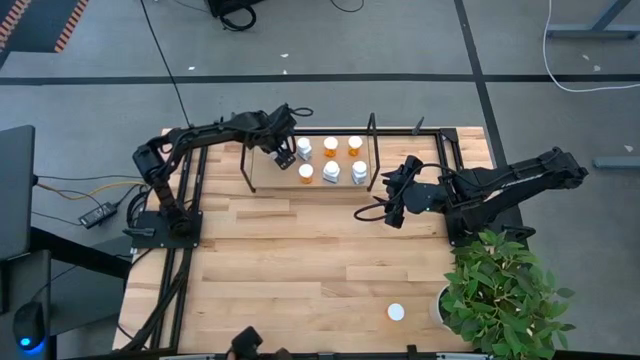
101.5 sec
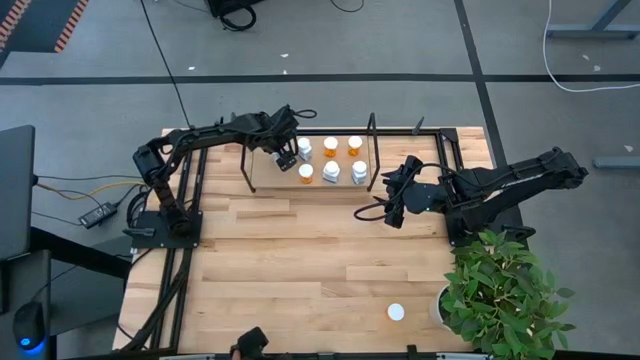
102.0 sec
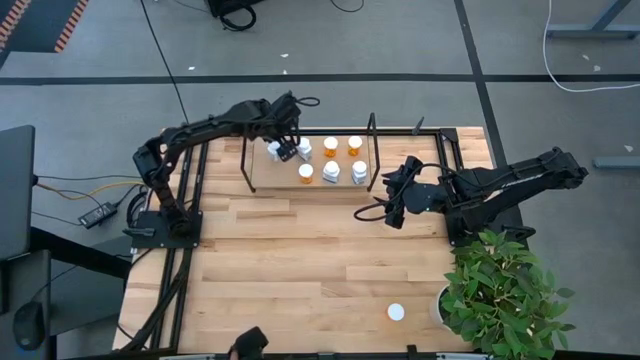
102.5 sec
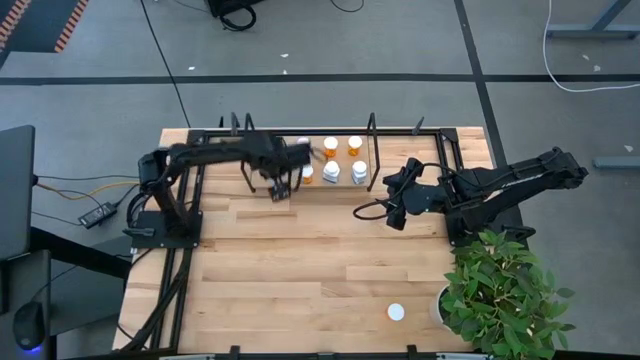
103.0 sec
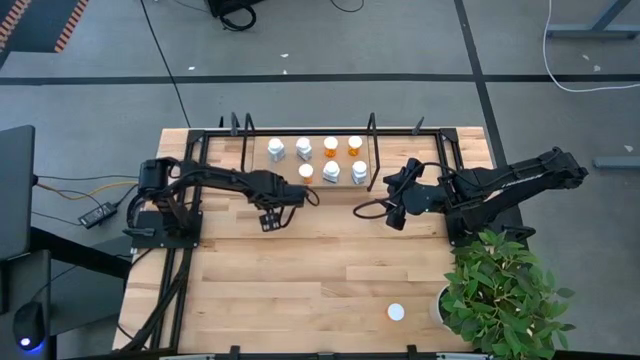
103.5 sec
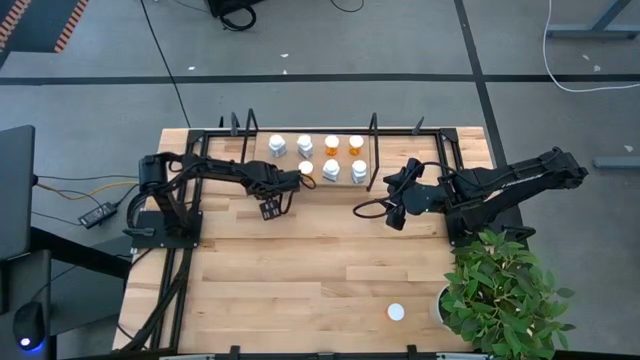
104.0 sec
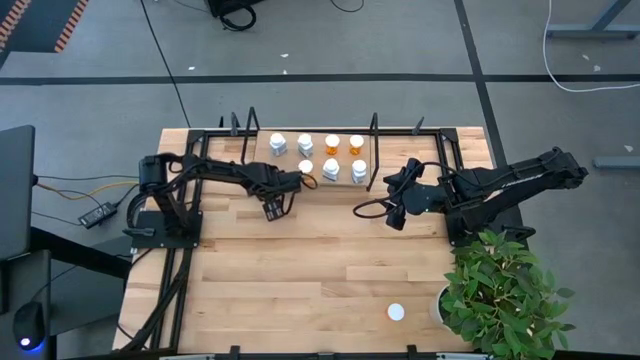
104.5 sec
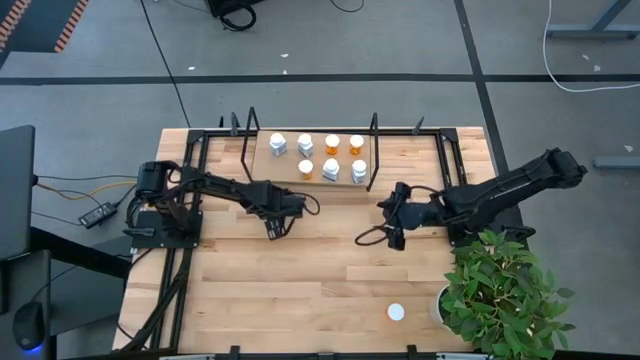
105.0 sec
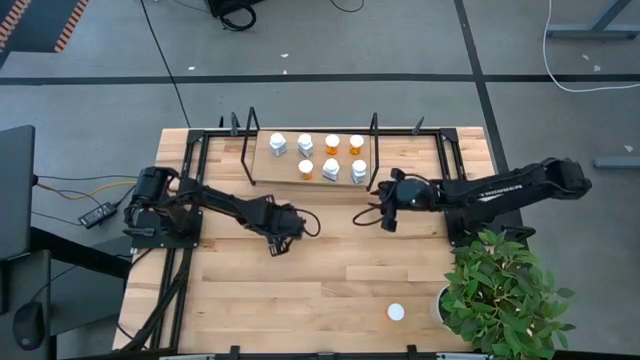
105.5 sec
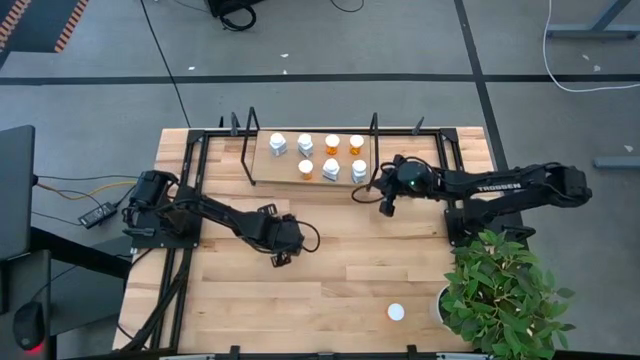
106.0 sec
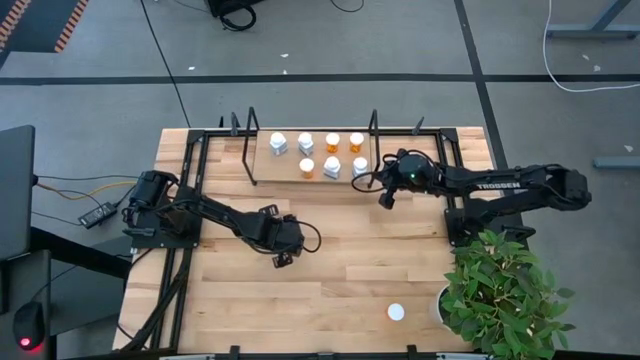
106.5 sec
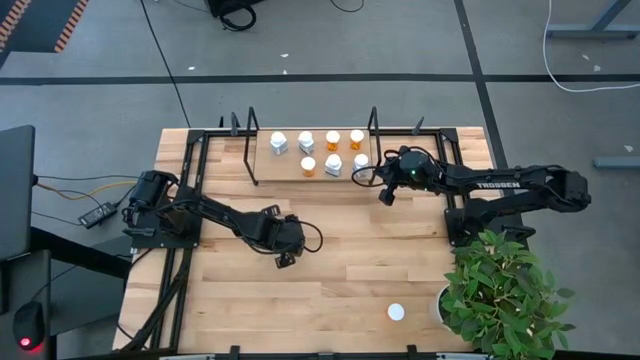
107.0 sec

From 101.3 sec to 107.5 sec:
Task: Pick and place medicine bottles onto shelf by color
Adjust the shelf

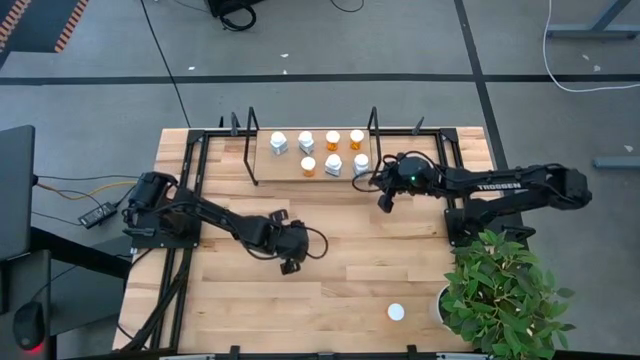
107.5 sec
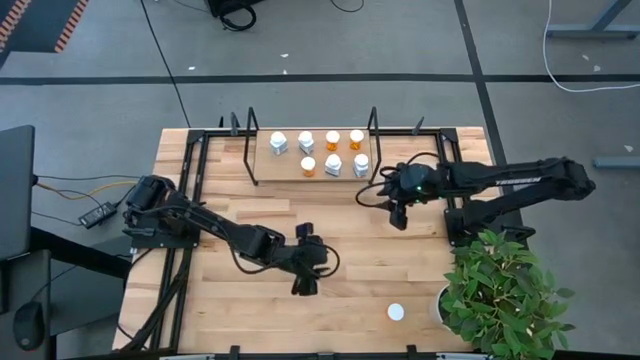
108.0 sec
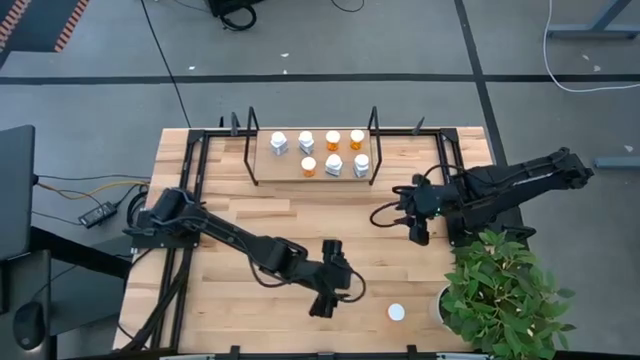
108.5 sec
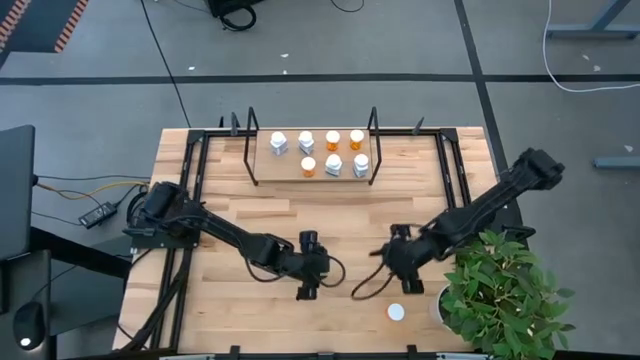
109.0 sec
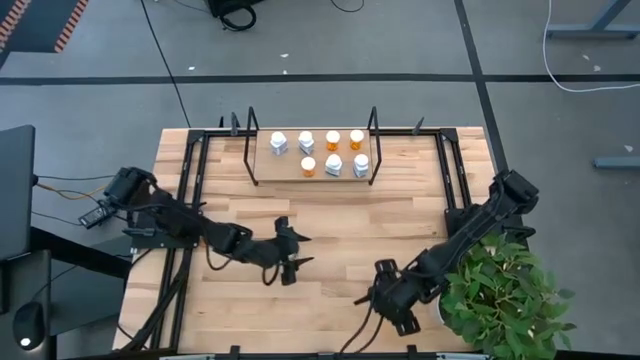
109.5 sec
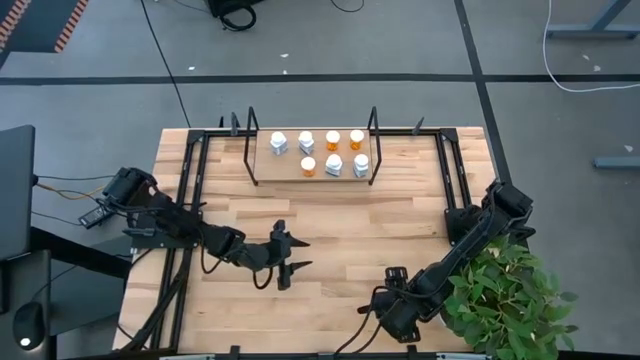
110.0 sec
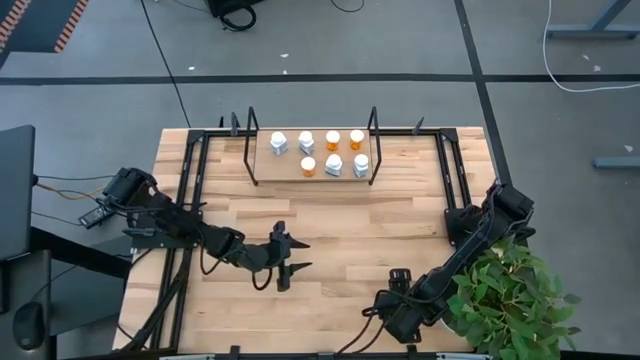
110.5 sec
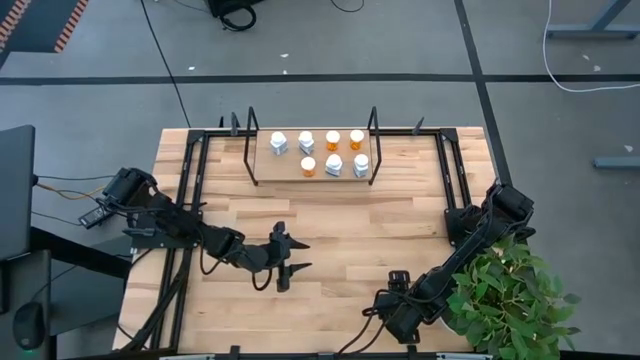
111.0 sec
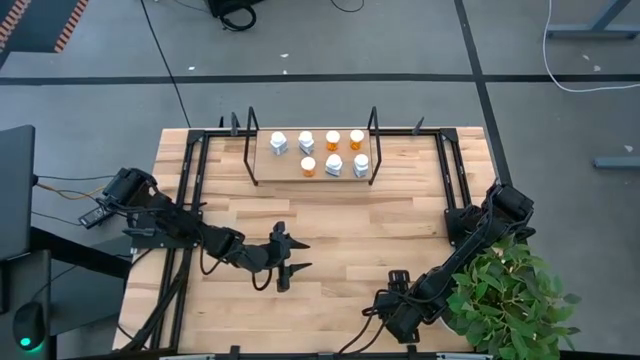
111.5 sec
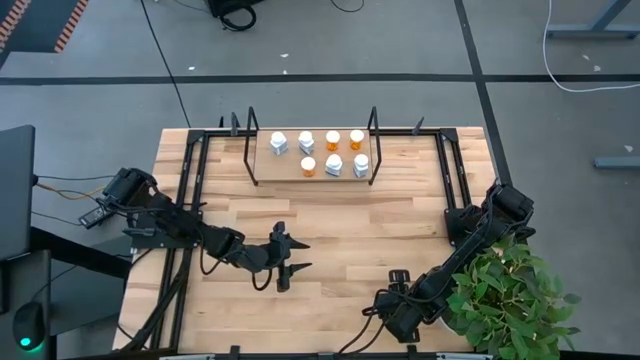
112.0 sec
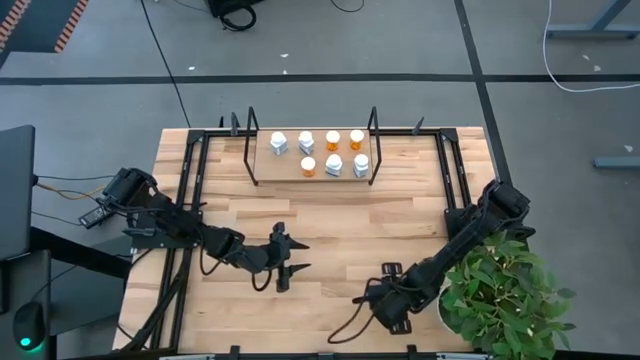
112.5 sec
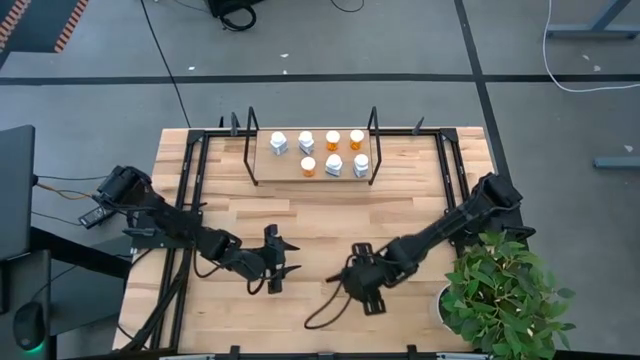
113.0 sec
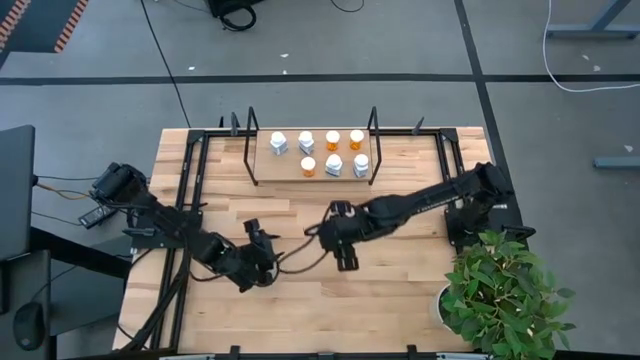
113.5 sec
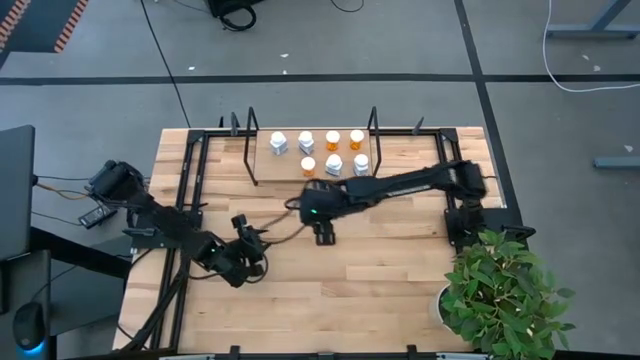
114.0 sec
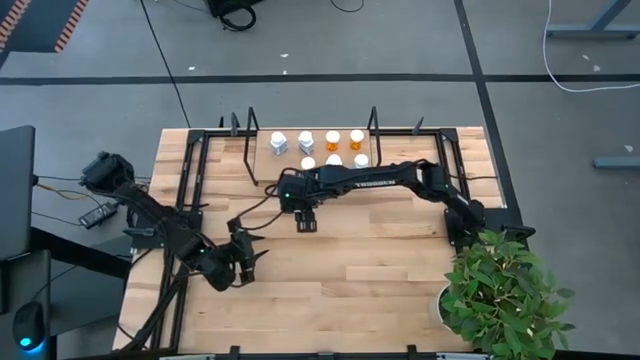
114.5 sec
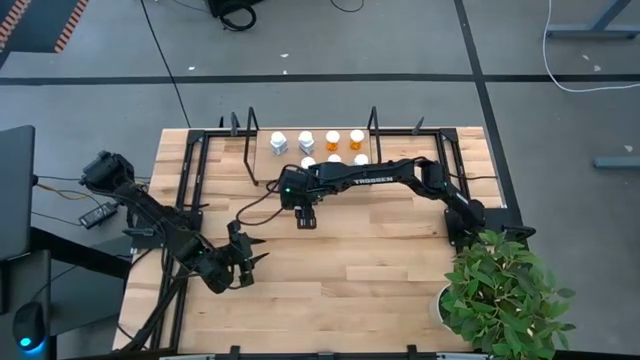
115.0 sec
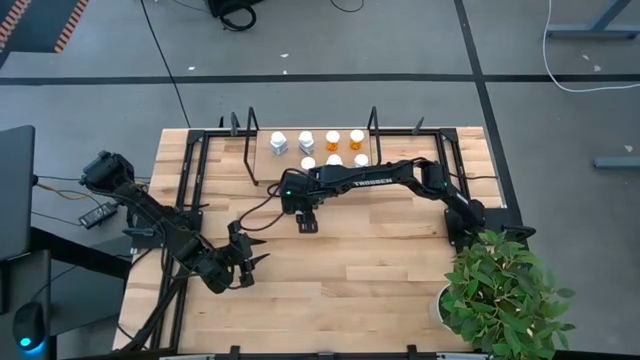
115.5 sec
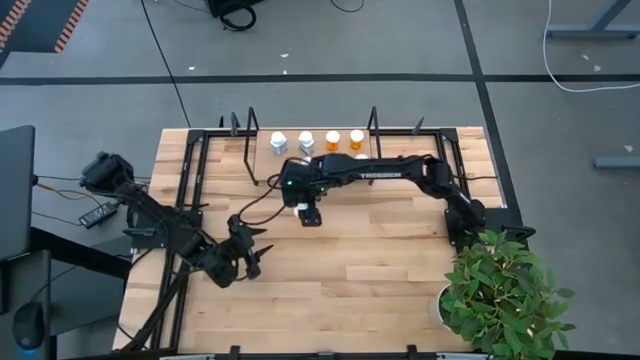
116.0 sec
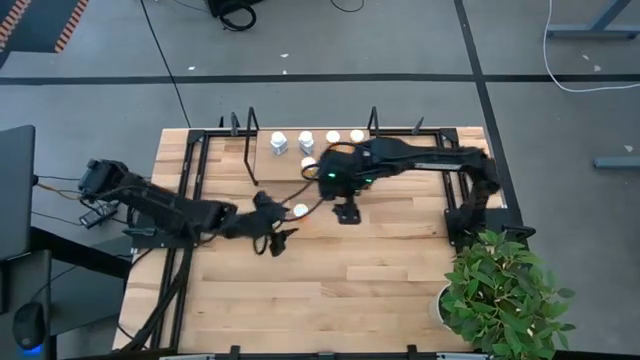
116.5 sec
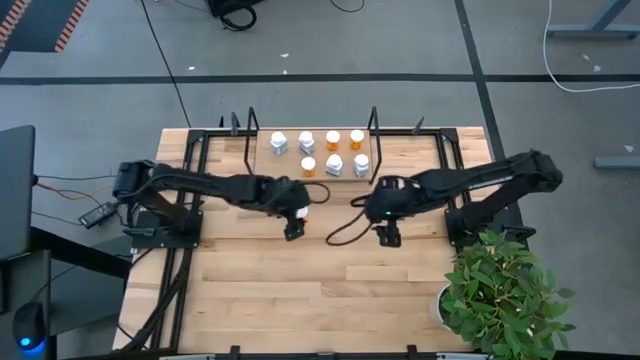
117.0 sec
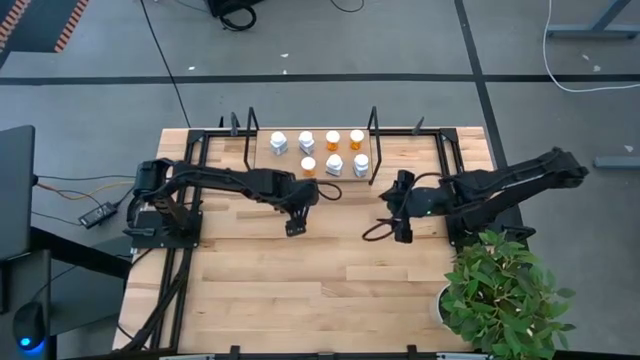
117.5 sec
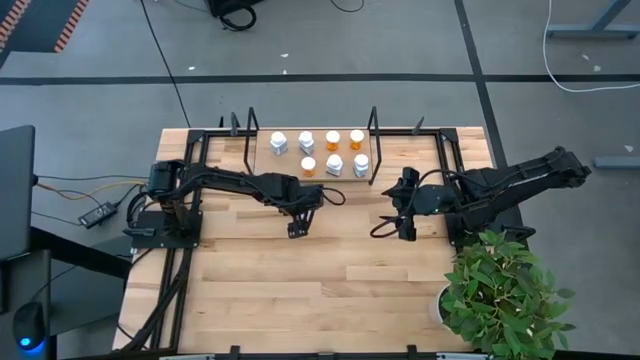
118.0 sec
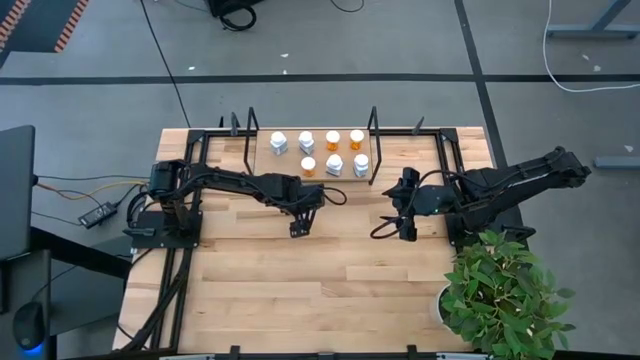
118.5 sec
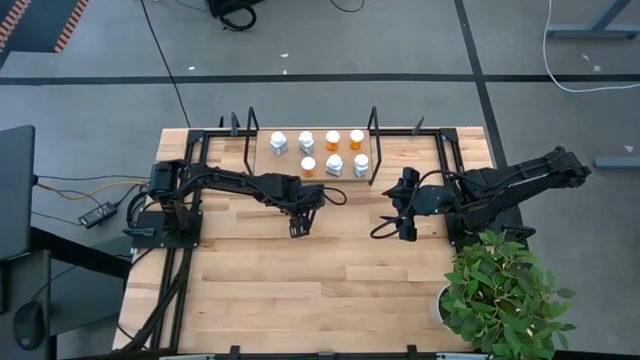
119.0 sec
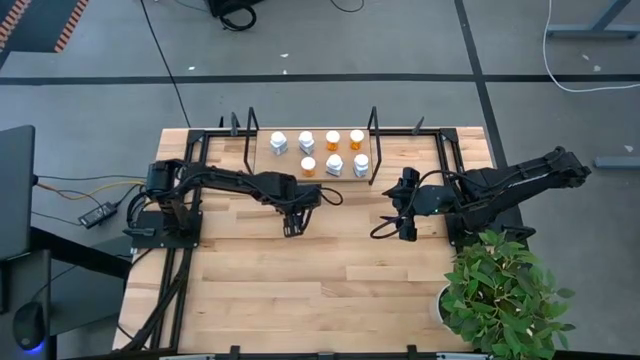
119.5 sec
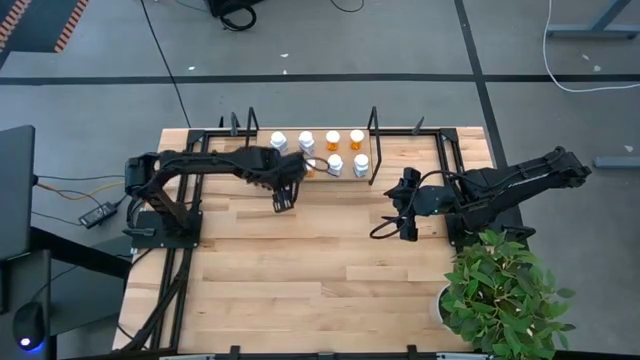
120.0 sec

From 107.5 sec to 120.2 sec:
Put the orange pill bottle on the shelf

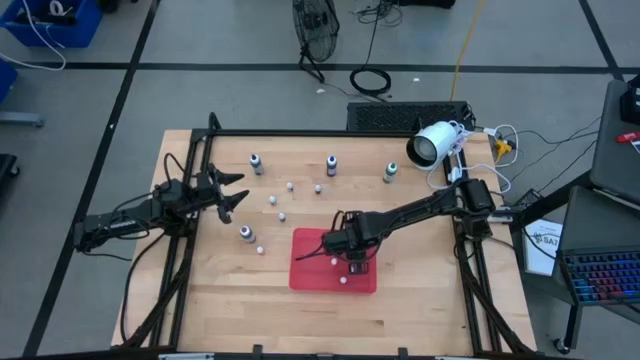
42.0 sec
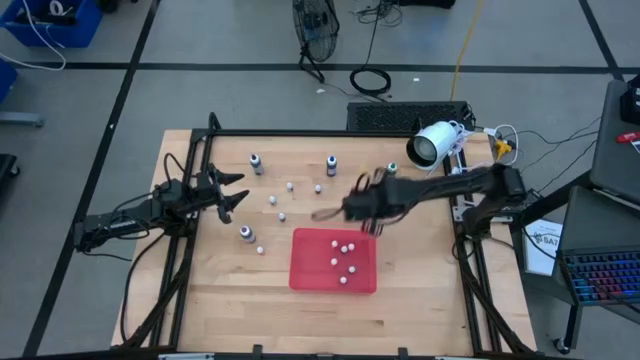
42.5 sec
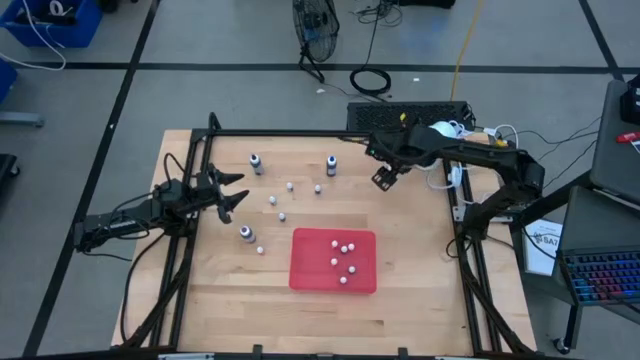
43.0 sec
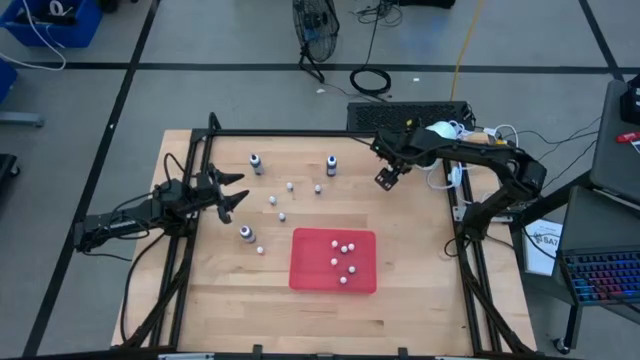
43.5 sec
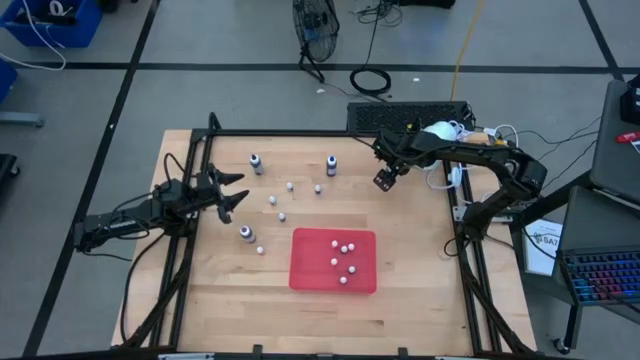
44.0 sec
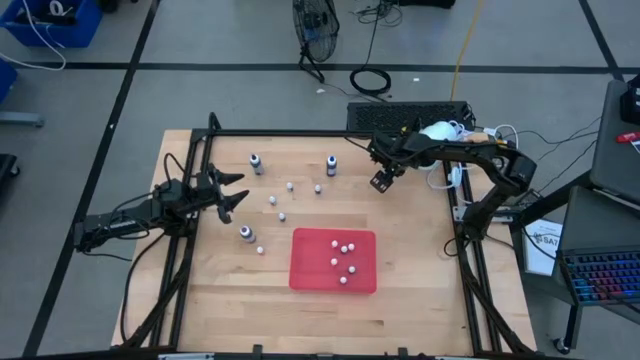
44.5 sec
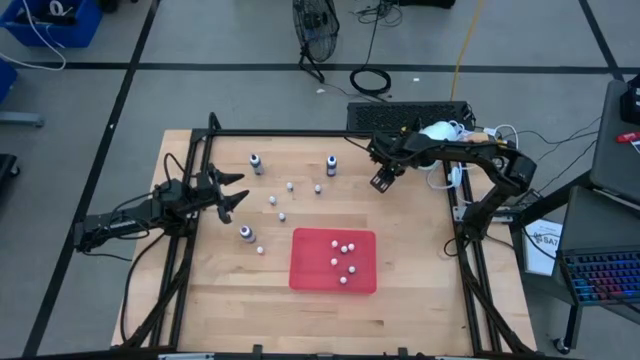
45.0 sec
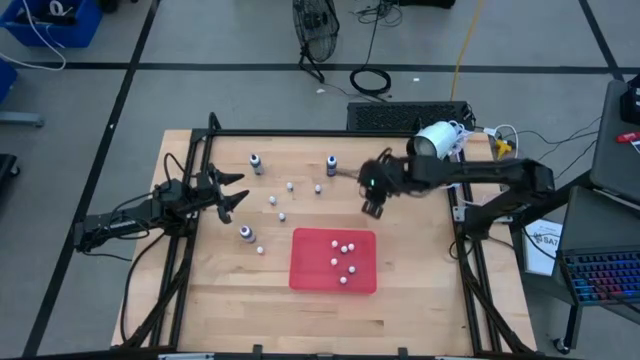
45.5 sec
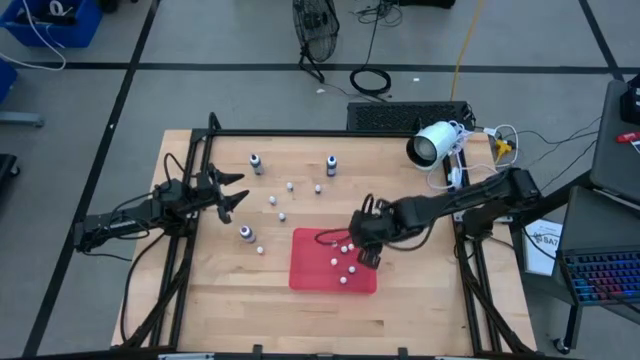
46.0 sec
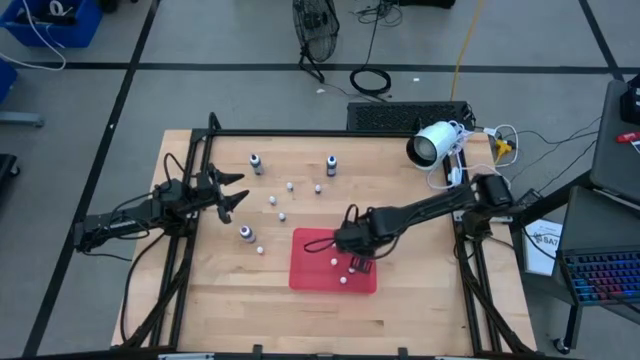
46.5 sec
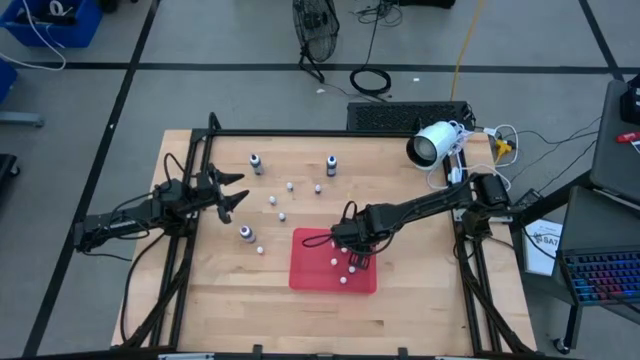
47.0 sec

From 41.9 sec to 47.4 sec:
Task: Pick & Place food coloring
Put the large green food coloring bottle into the red bin
